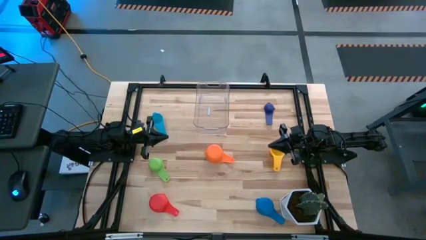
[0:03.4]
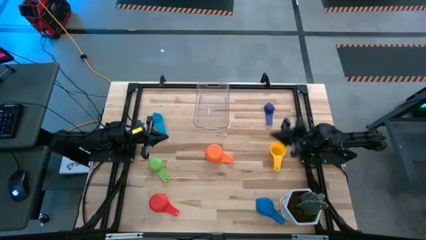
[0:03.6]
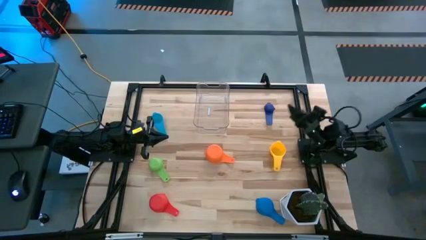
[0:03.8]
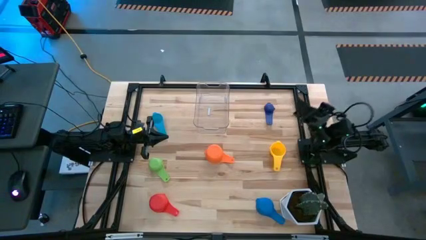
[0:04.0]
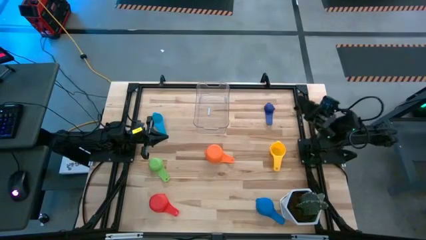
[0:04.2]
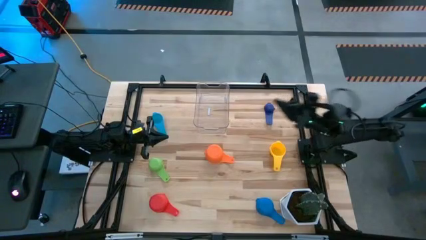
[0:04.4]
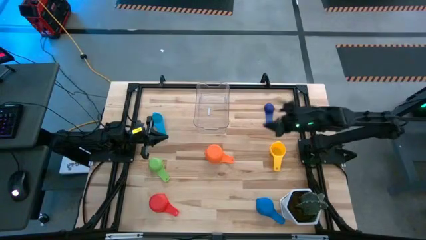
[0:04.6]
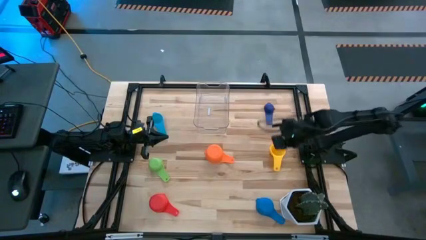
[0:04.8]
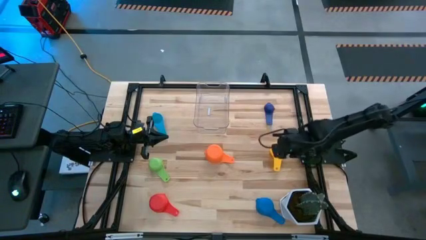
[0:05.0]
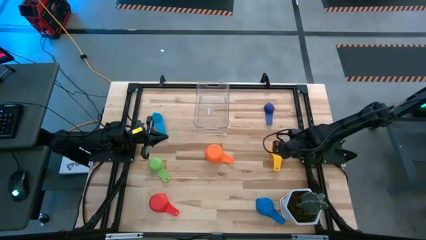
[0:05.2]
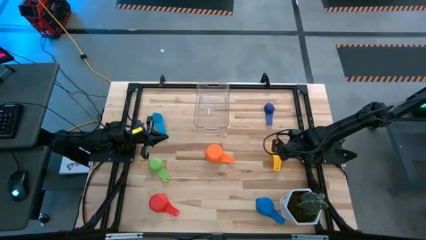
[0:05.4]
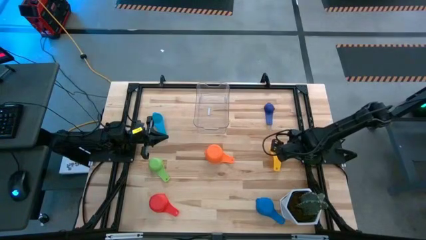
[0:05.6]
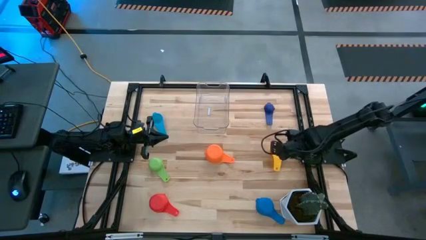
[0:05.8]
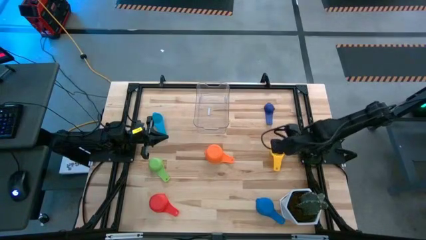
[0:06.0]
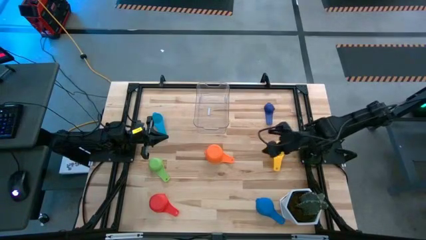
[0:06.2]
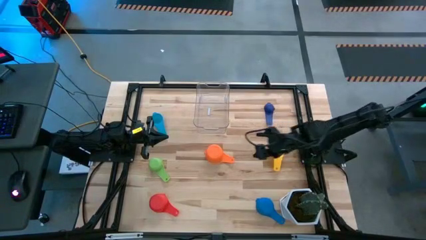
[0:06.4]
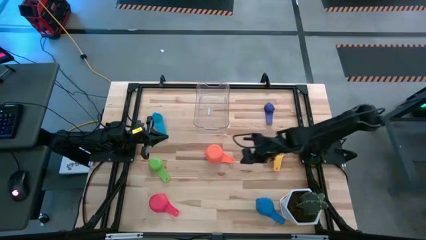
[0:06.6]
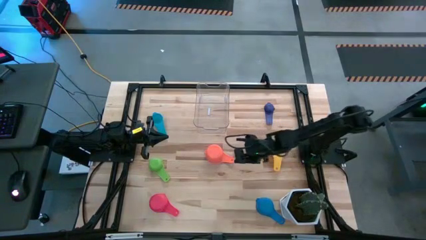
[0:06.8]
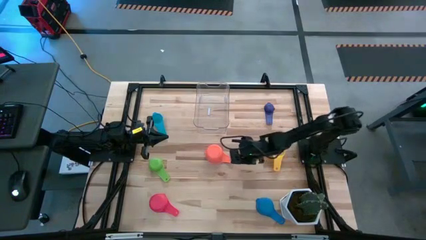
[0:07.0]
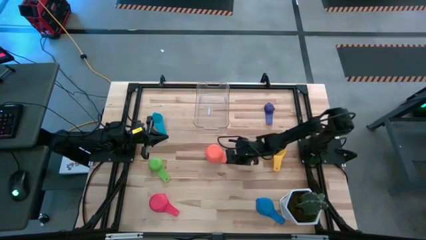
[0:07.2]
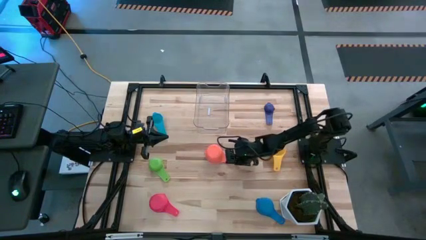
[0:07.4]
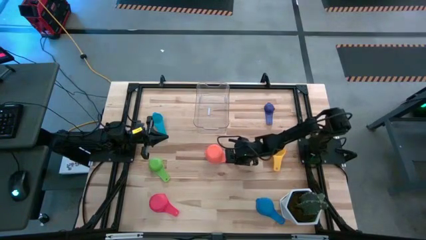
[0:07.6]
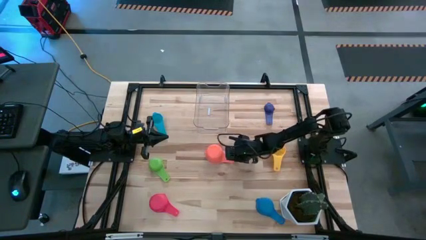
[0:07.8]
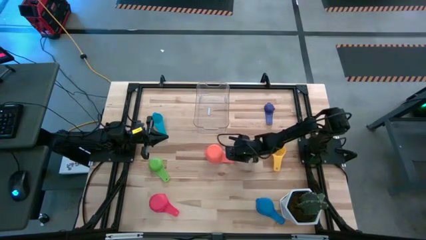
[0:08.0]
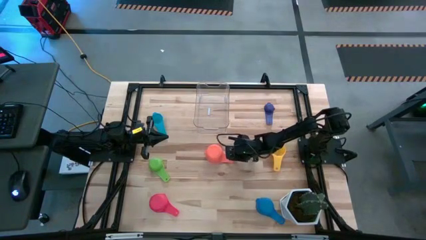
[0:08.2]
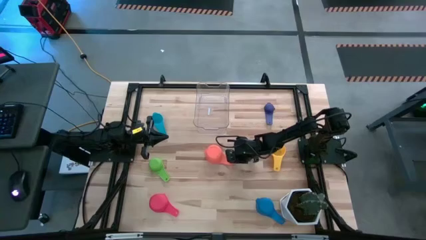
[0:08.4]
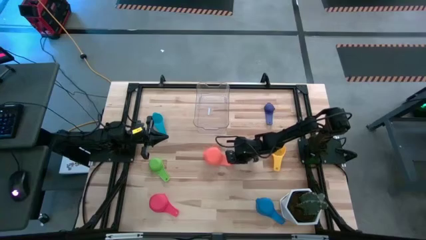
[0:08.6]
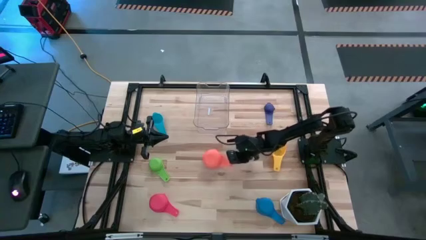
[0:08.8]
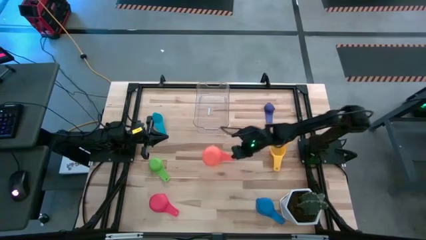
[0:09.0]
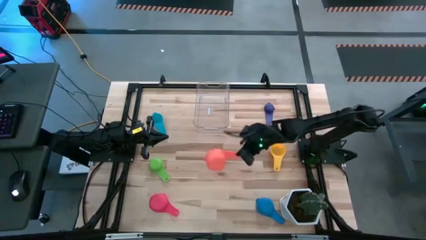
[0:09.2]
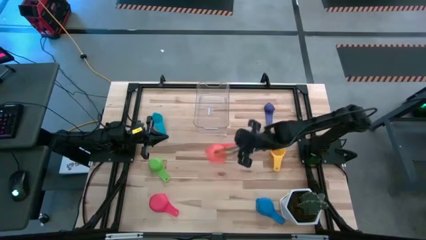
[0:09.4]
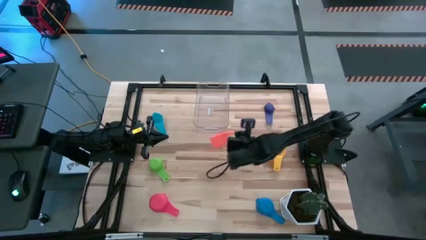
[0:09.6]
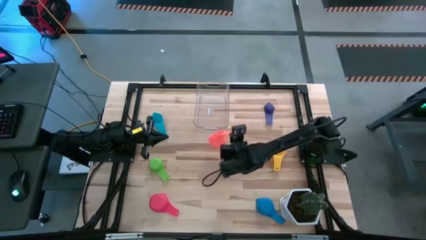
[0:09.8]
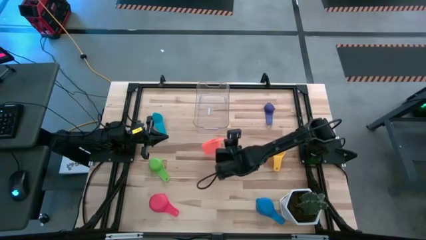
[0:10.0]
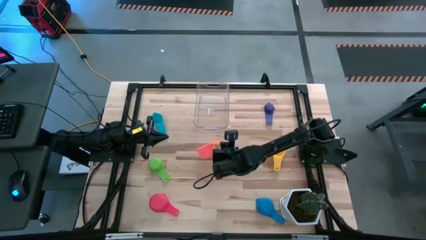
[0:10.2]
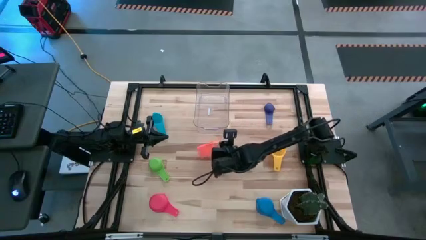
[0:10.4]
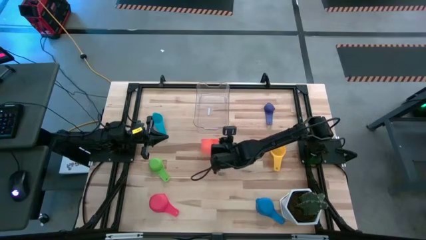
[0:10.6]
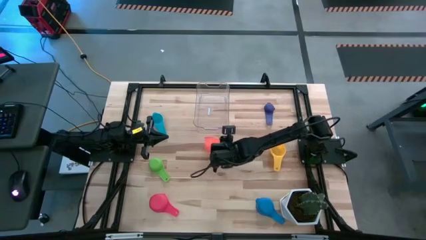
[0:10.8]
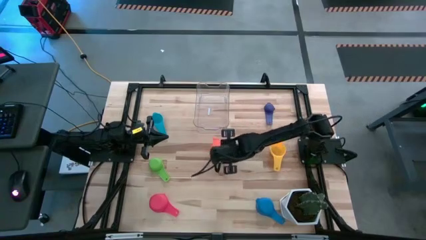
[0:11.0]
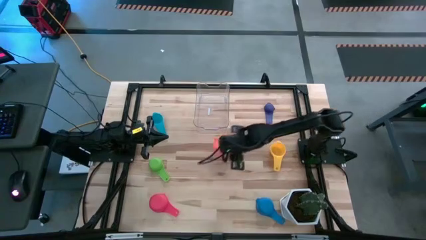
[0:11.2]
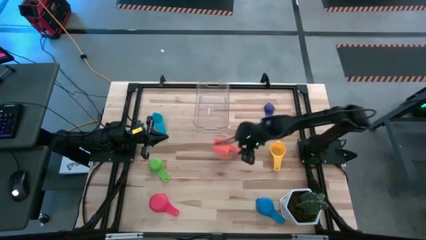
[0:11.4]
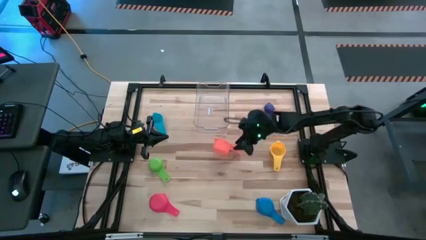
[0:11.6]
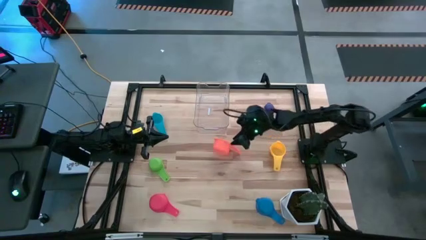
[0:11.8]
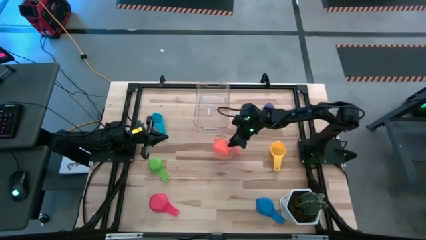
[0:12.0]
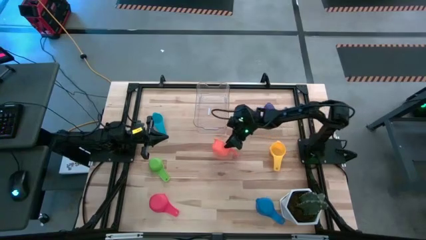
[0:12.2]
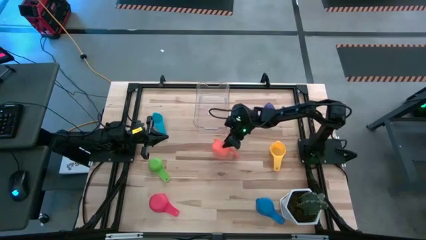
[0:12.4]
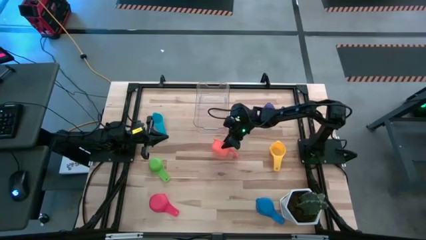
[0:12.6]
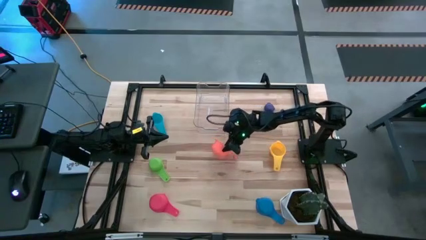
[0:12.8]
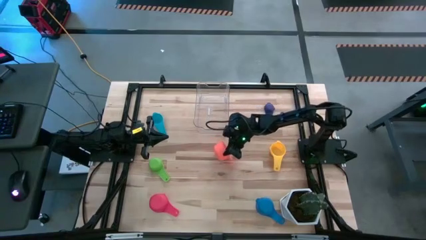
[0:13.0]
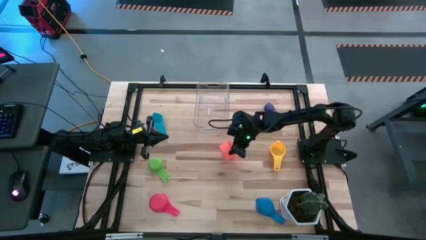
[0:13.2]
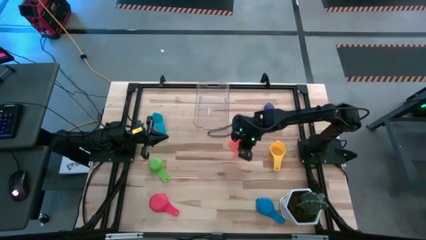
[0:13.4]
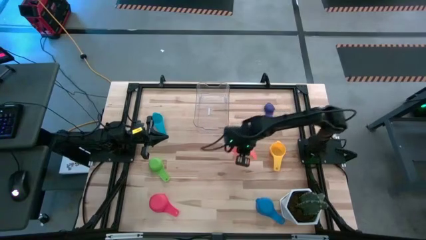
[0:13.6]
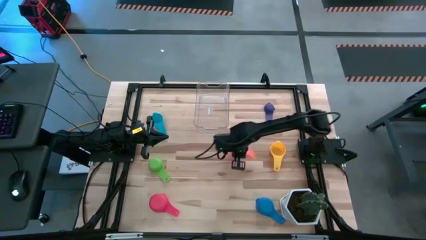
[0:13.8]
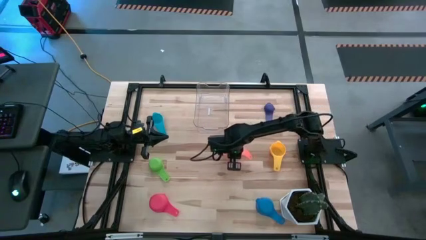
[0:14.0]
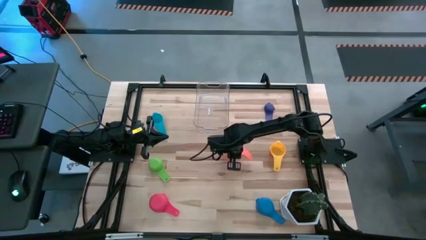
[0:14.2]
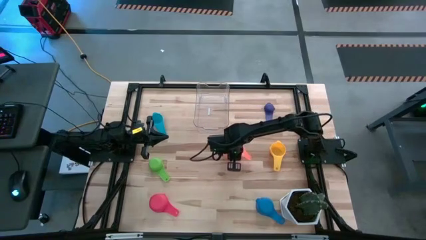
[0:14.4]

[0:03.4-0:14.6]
Task: Nest measuring cups in basket
Adjust the orange measuring cup

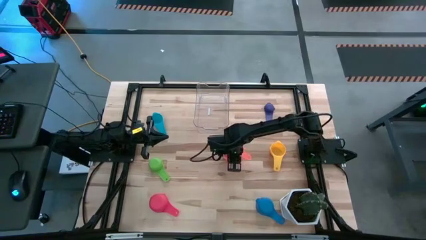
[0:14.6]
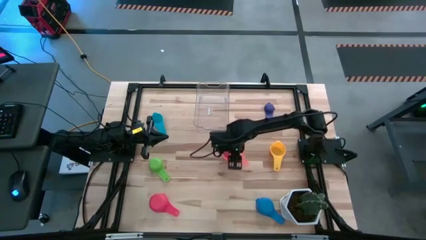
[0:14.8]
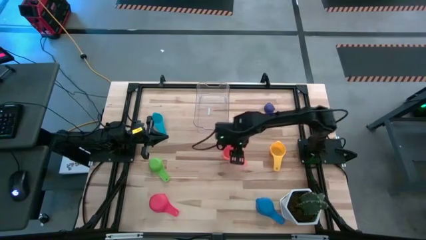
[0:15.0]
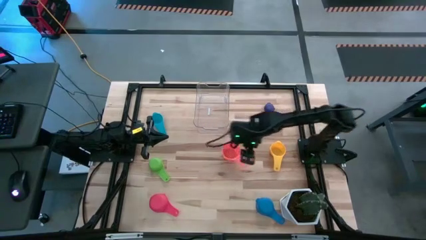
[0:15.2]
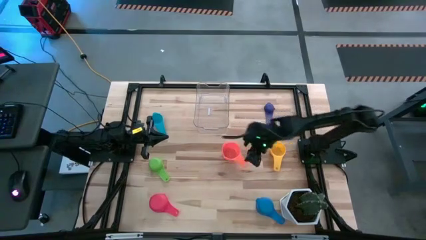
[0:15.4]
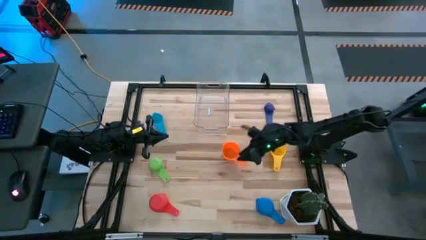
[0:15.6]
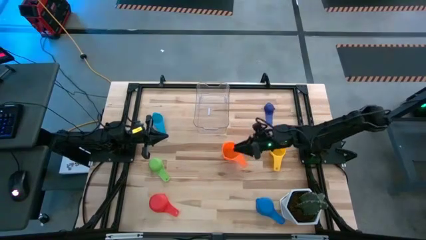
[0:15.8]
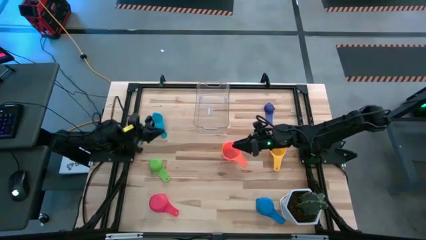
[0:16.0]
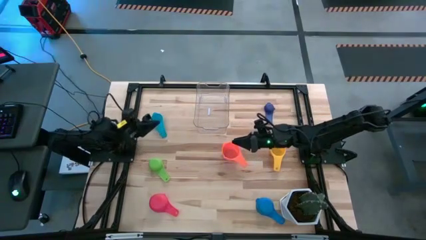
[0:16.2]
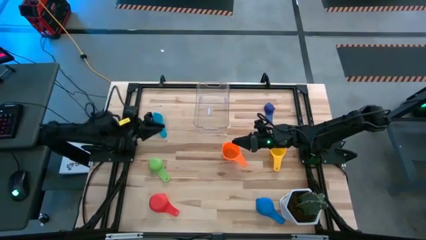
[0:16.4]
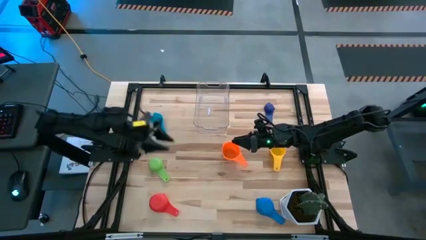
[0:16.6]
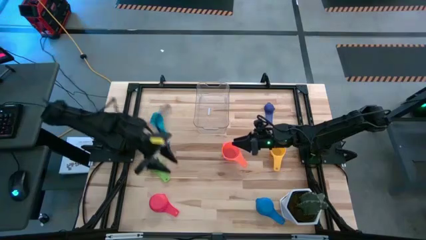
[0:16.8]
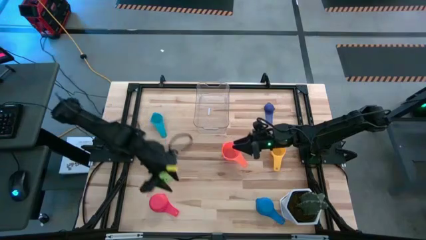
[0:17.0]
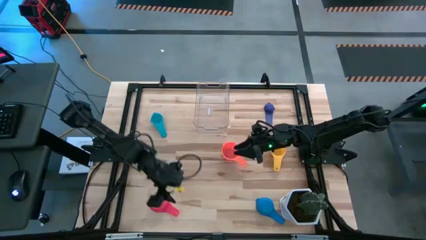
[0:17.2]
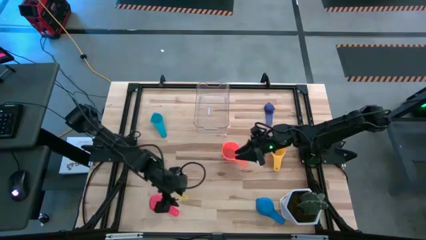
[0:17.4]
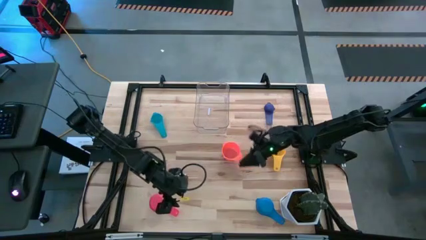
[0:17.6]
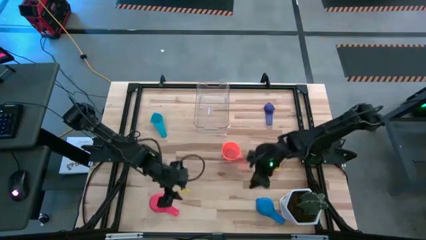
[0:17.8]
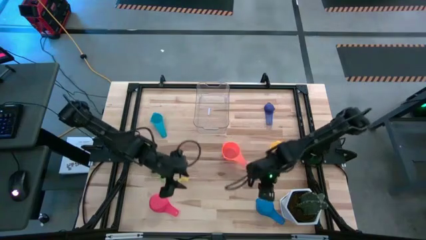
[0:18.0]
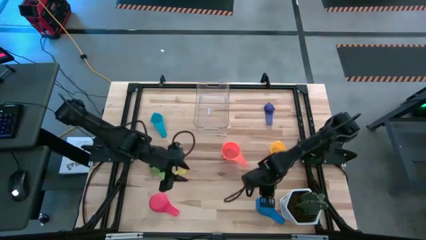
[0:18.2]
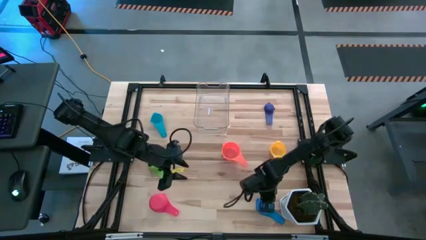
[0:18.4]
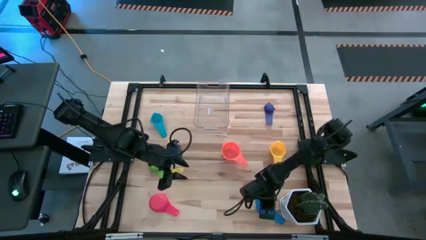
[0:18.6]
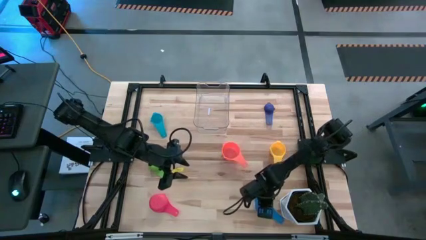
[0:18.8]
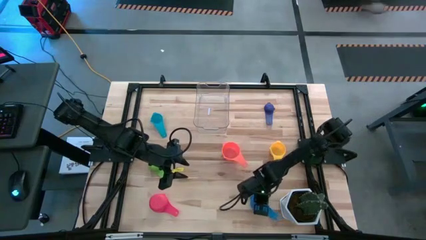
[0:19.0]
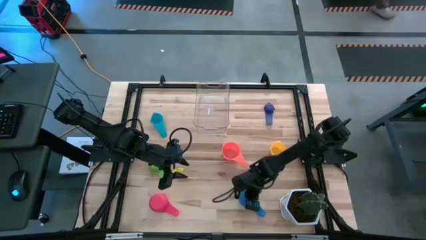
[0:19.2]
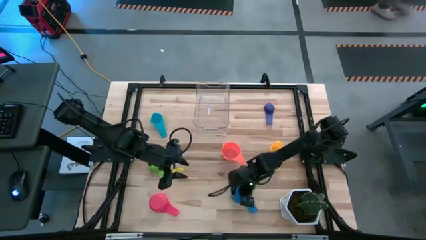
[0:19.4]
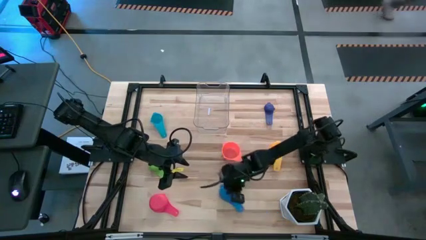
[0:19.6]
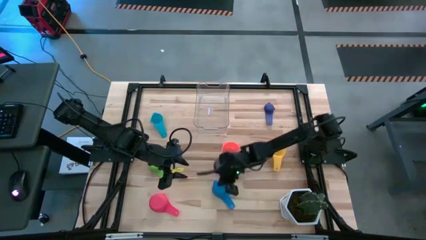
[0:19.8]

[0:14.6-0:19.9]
Move the blue measuring cup to the bottom center of the table
